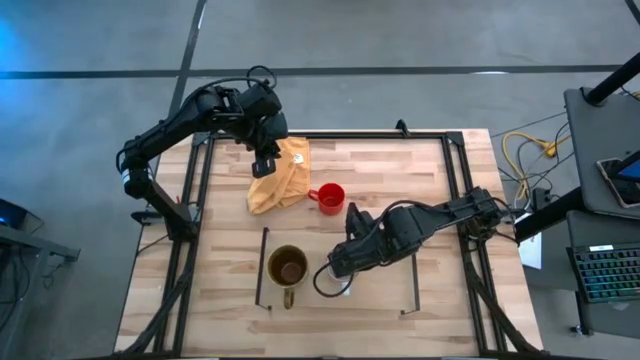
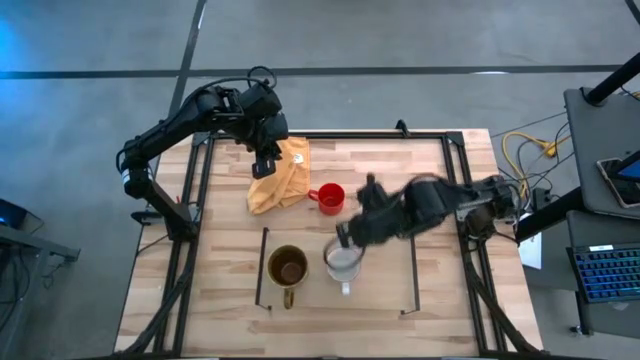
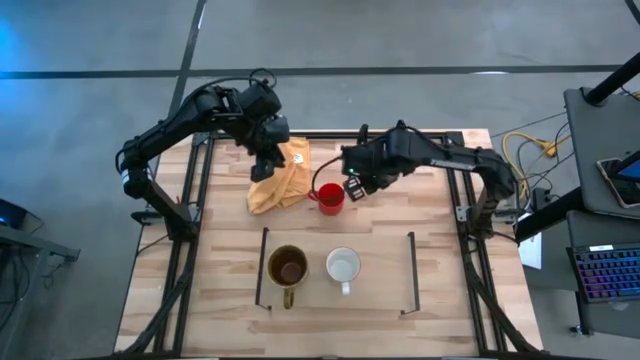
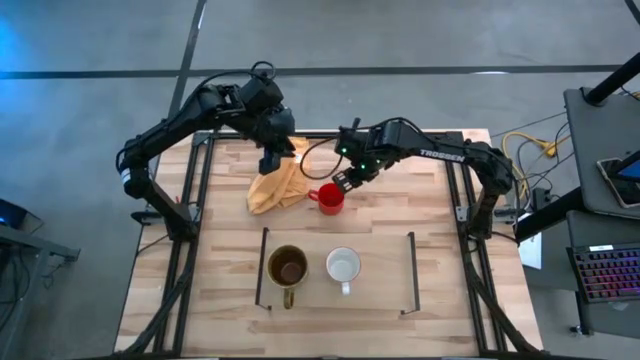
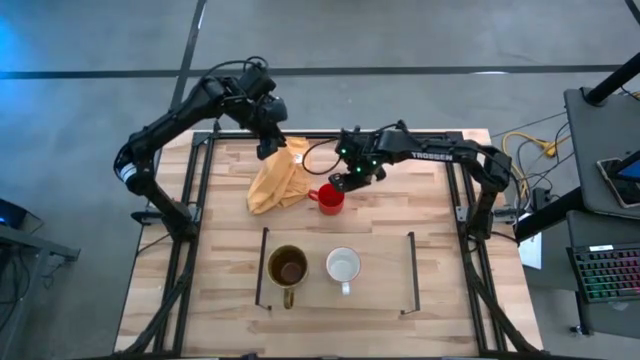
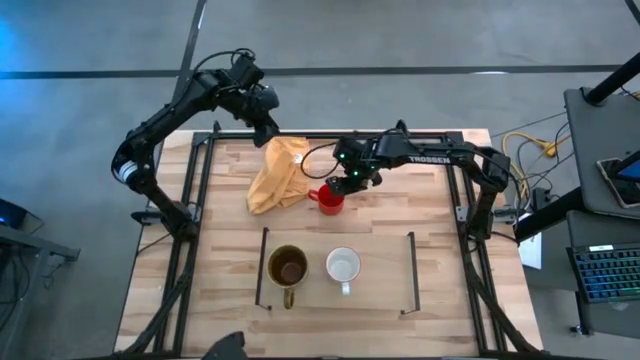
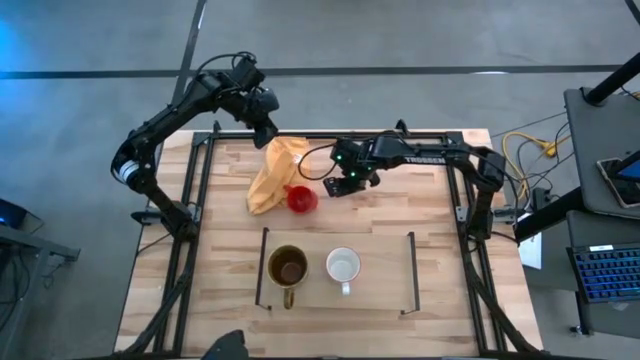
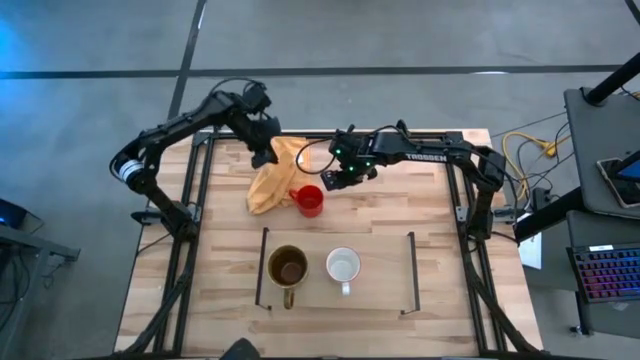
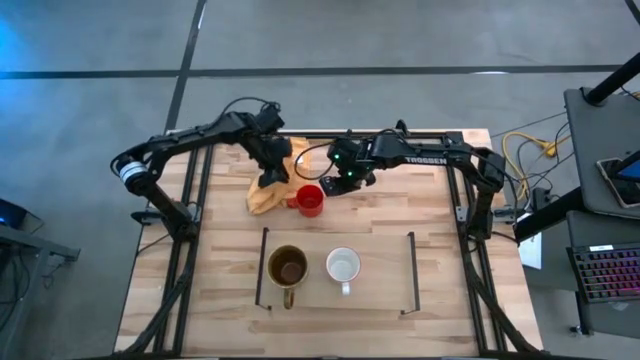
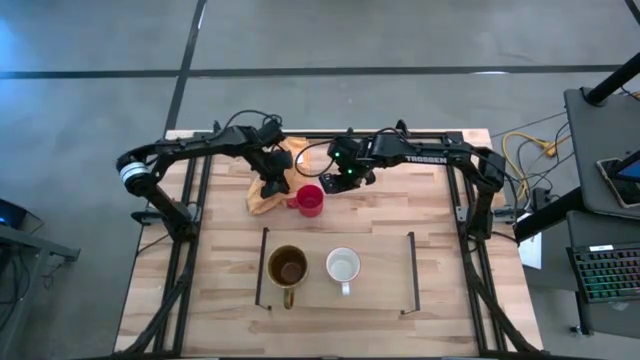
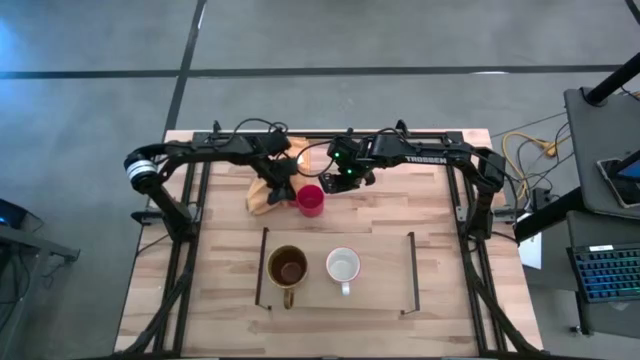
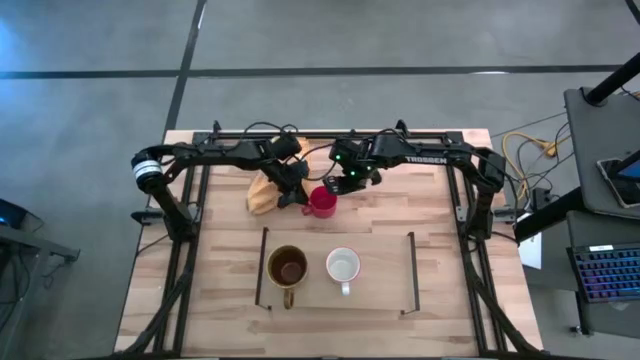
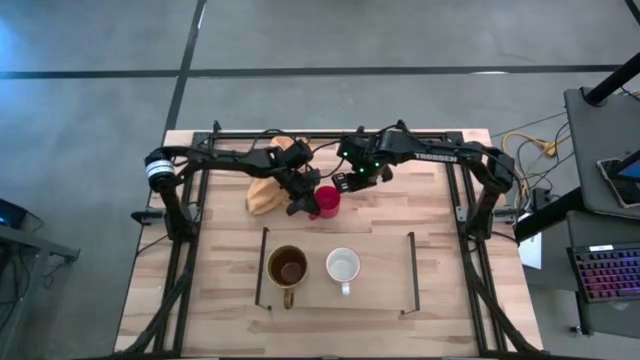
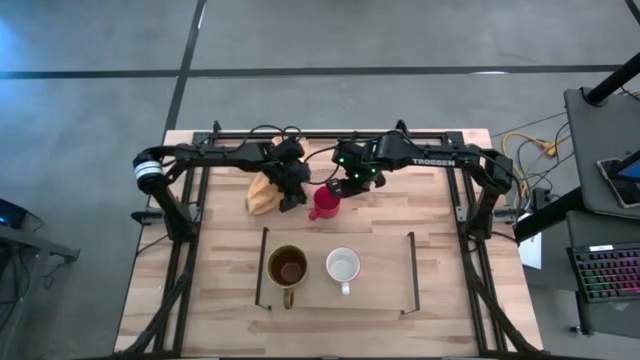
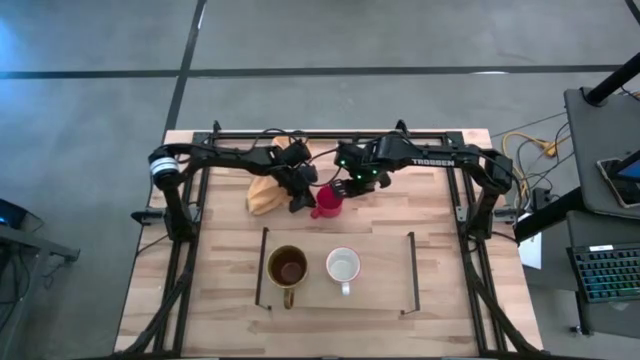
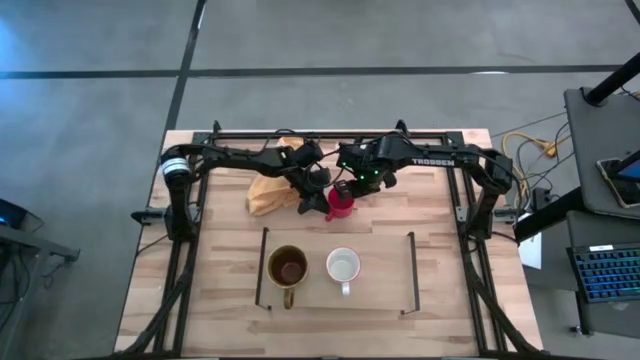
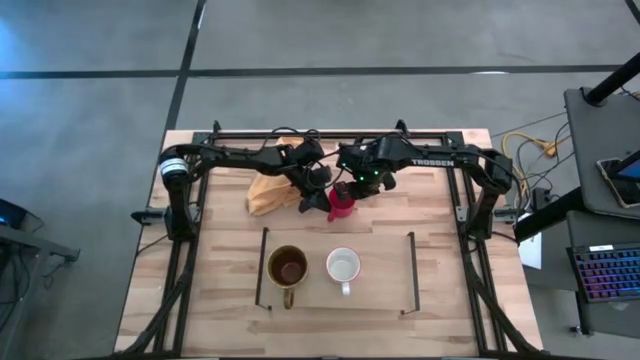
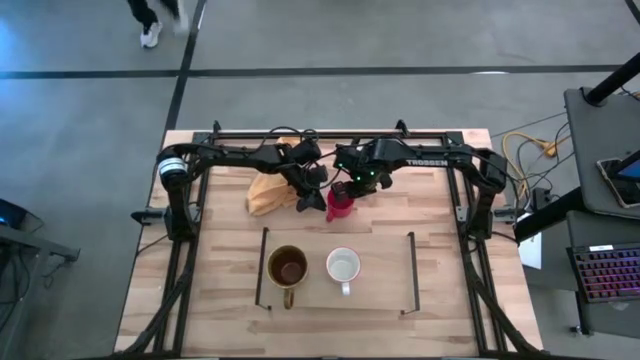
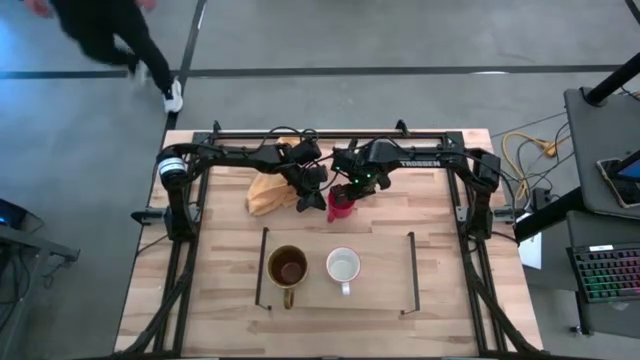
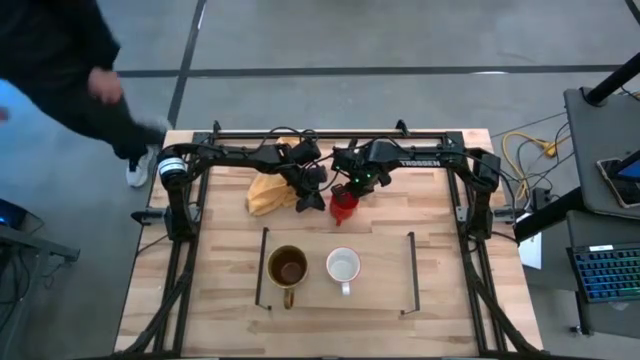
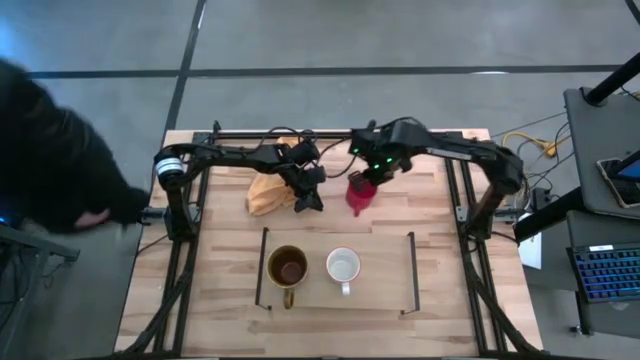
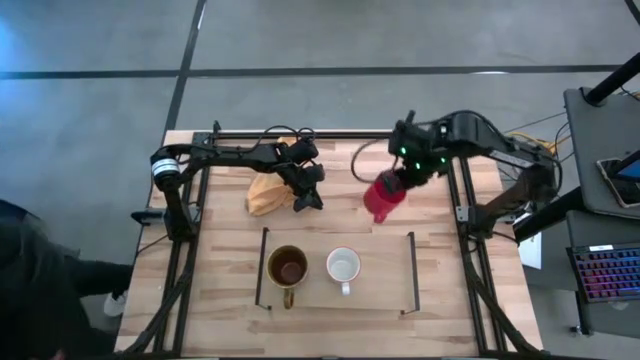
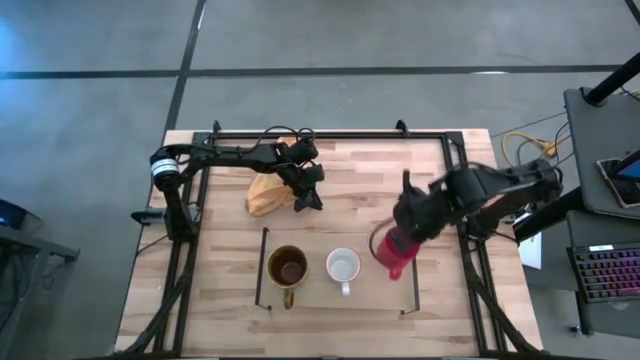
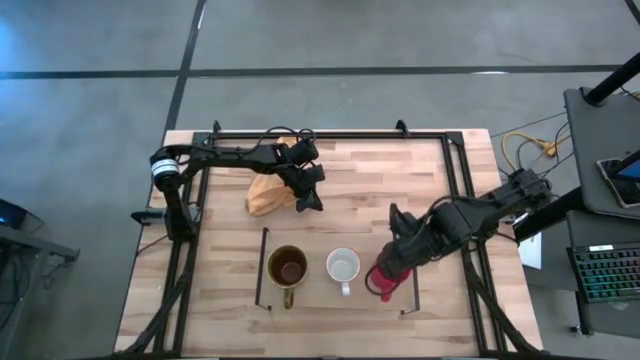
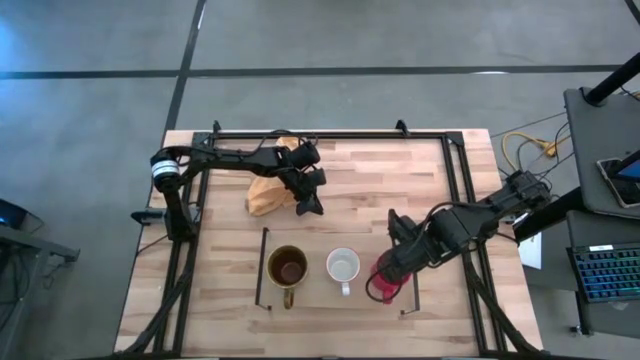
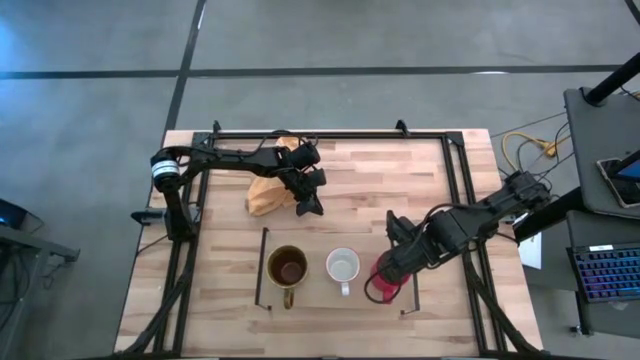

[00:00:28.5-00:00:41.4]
Task: Stack small to large cups/mugs on shelf
Put the red mug on the shelf

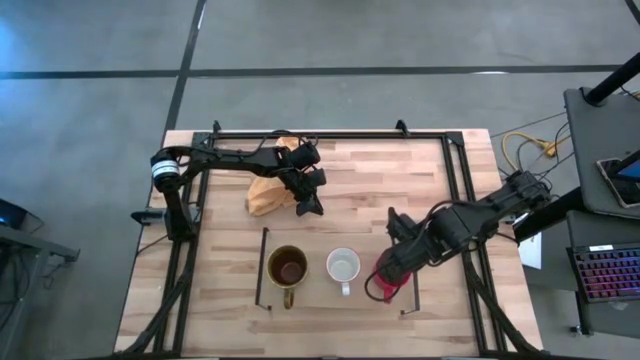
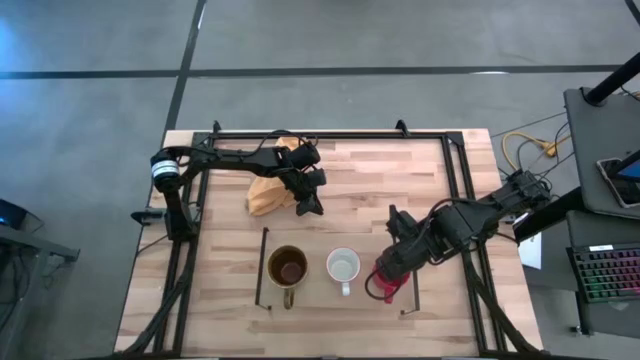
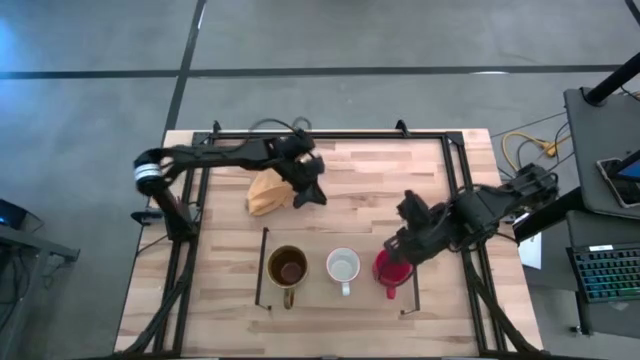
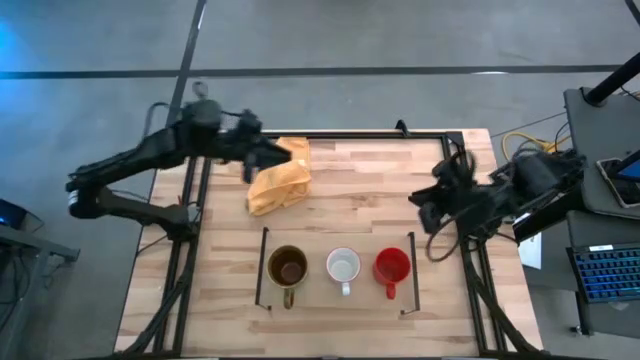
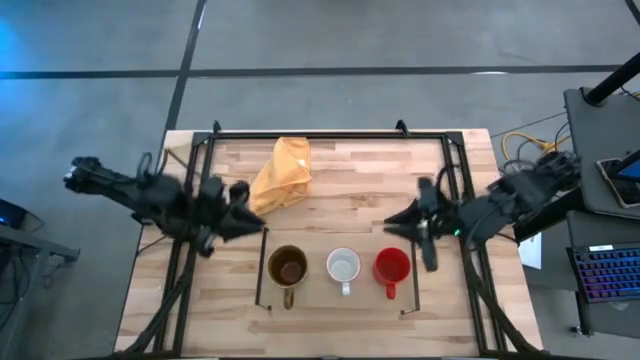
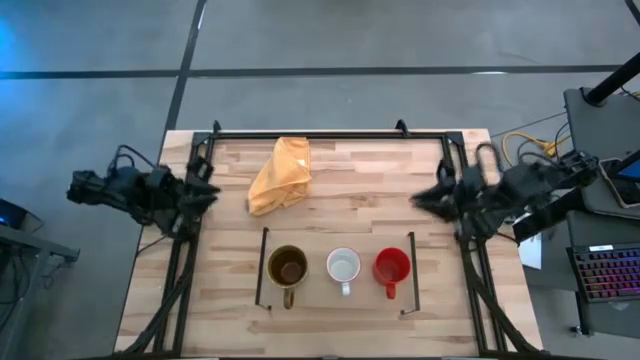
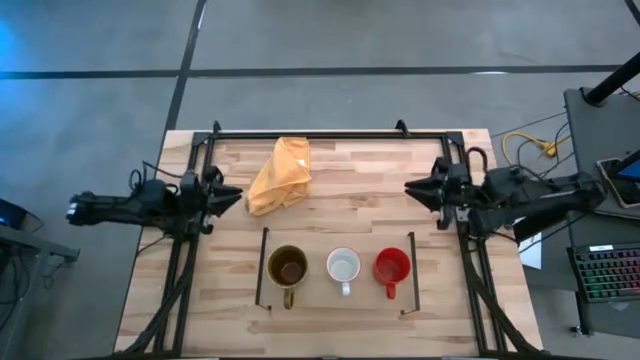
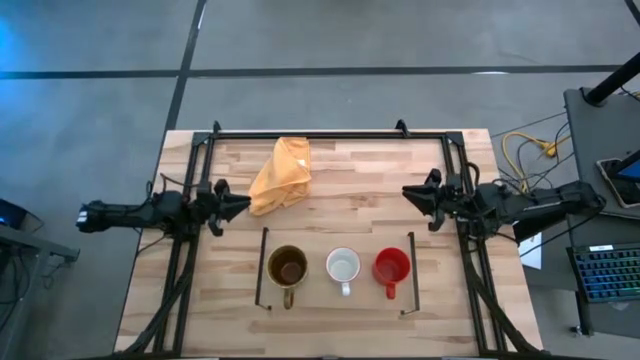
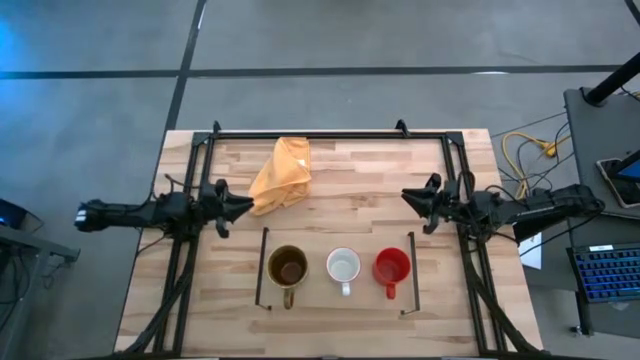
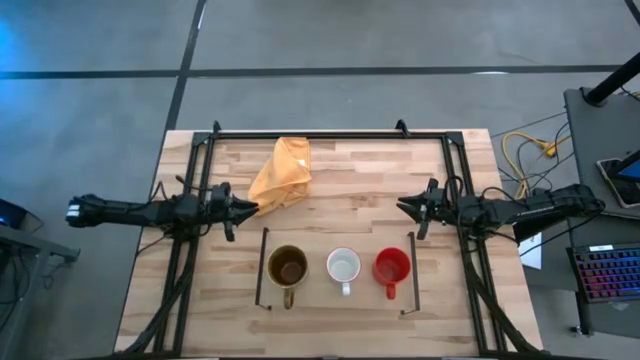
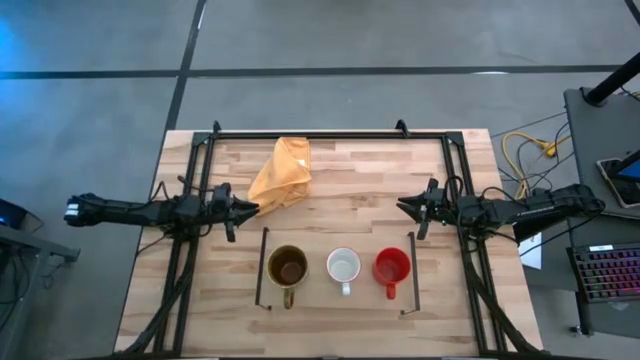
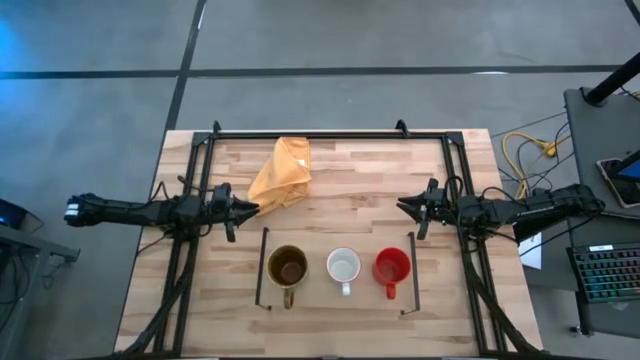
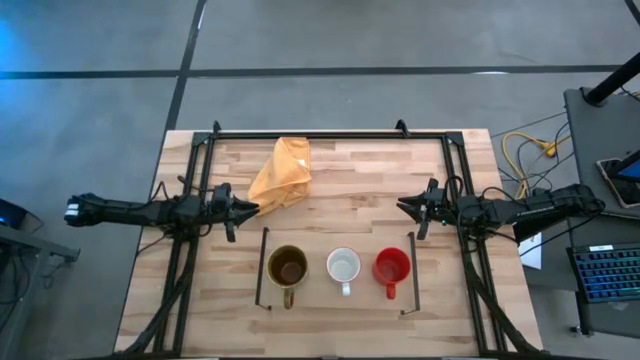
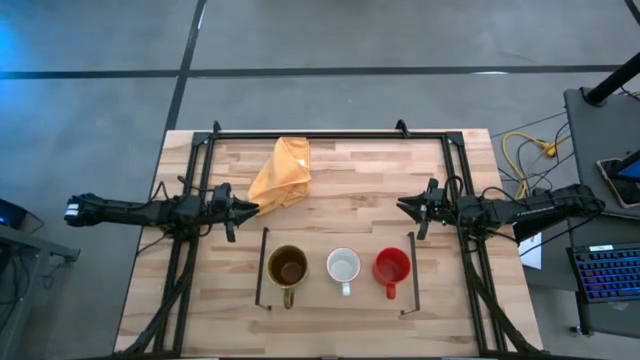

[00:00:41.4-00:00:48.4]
Return to Home Position
